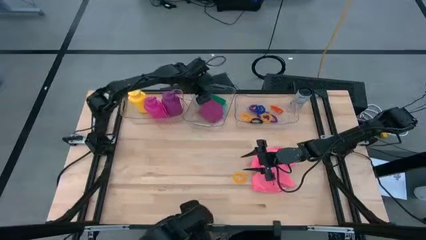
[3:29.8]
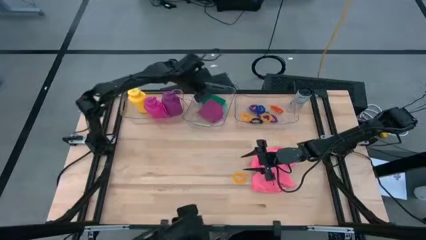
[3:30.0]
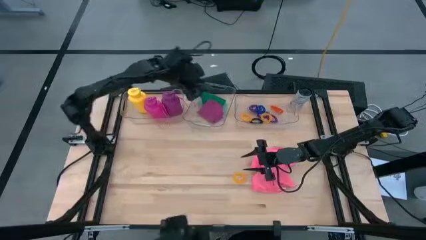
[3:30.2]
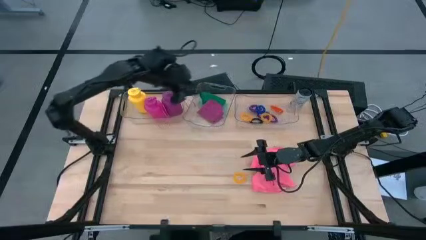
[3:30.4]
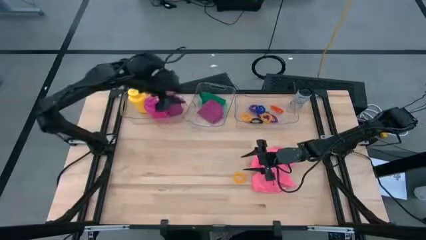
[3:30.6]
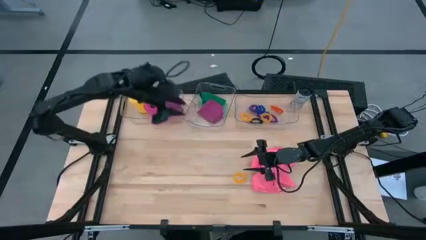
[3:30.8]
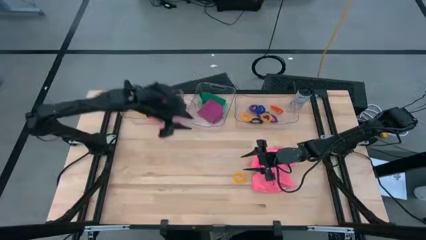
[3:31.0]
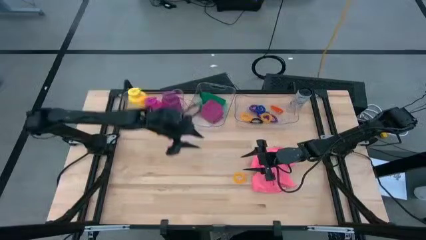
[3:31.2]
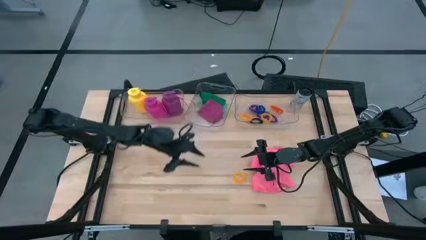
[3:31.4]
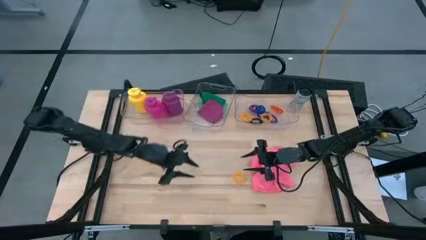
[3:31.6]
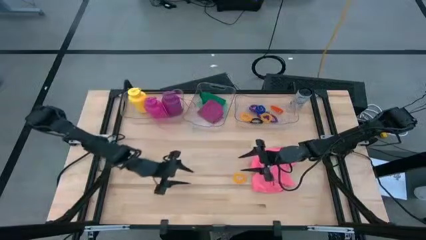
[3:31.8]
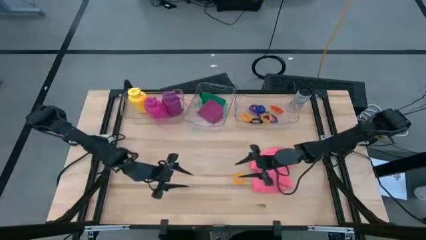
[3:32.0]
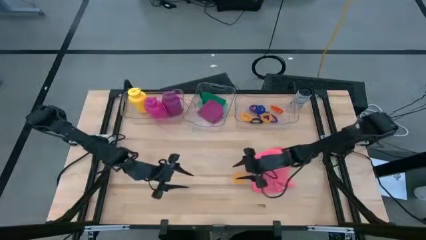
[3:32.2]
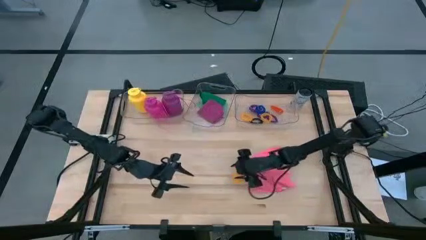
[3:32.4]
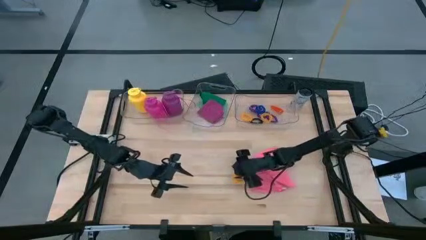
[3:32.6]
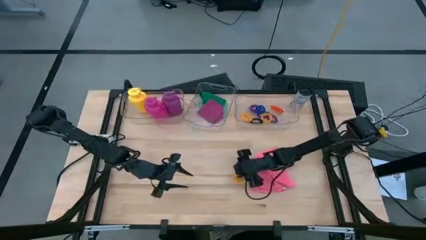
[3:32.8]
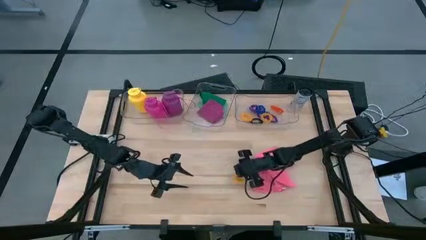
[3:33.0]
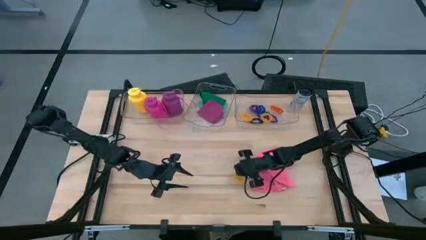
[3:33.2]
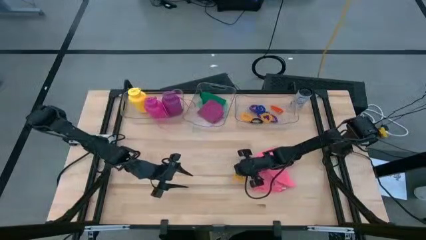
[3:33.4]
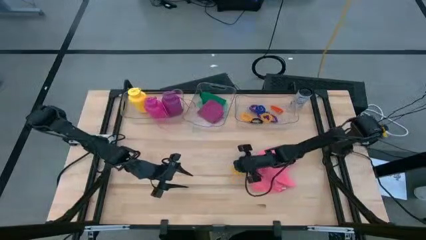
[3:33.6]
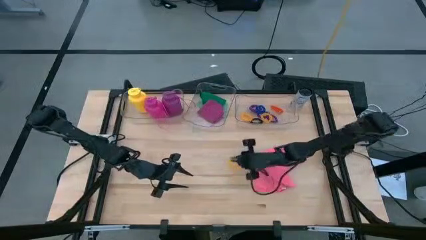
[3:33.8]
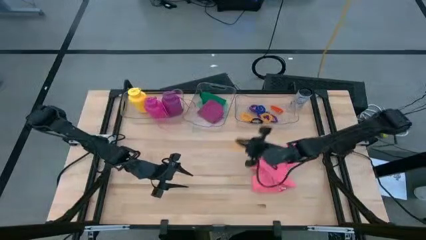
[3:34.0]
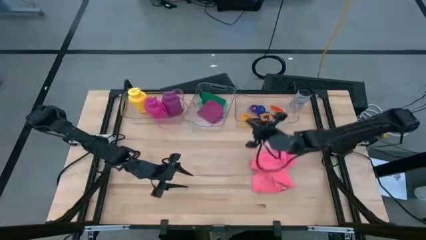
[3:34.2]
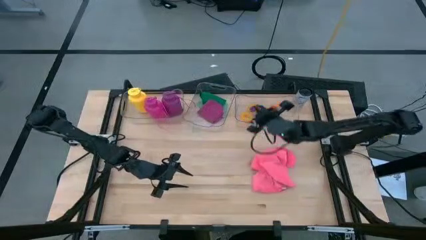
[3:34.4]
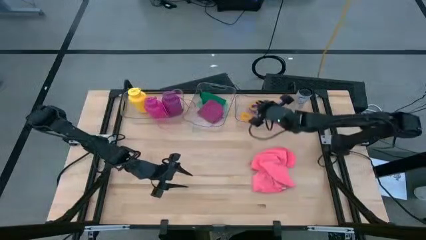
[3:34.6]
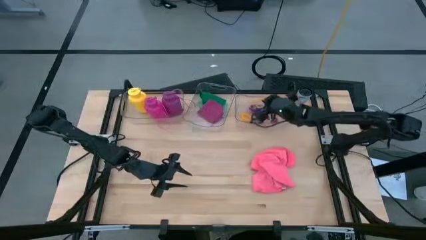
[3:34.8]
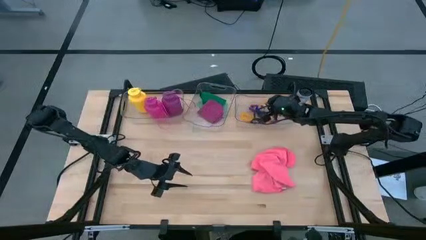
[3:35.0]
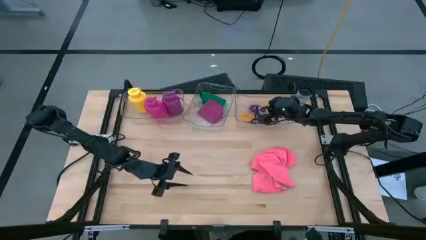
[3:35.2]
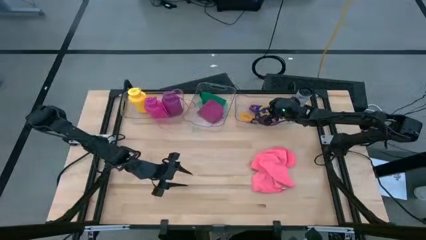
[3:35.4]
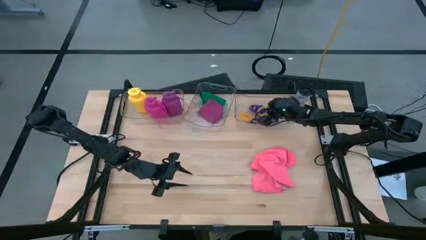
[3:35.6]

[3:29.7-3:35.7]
Task: Pick & Place Sports Items
Put the yellow spring keychain into the right transparent bin

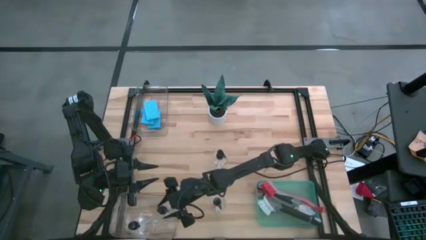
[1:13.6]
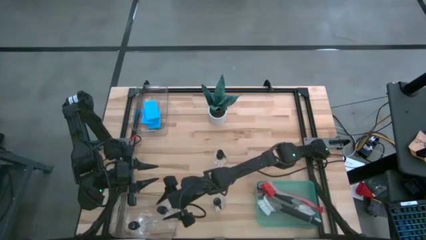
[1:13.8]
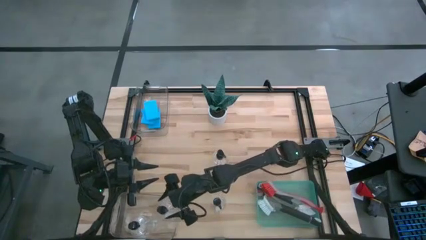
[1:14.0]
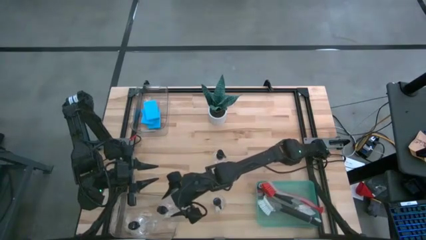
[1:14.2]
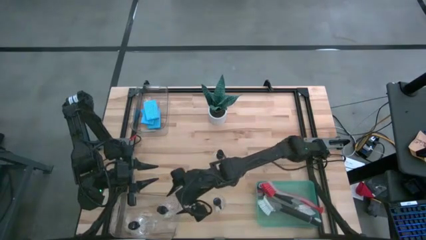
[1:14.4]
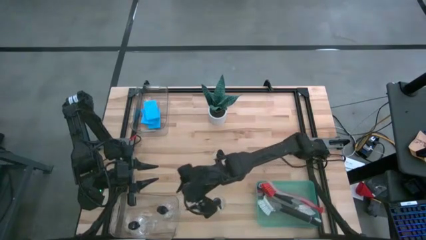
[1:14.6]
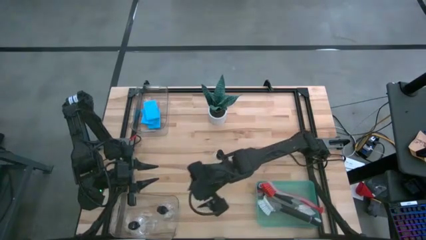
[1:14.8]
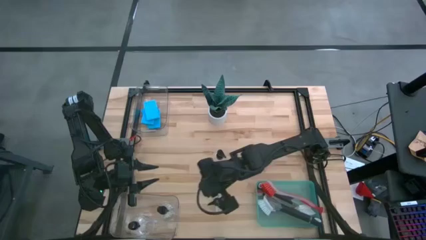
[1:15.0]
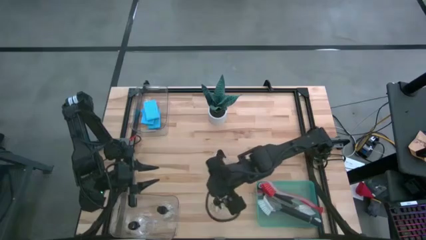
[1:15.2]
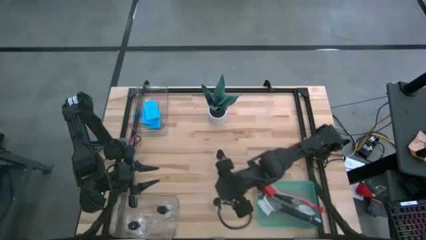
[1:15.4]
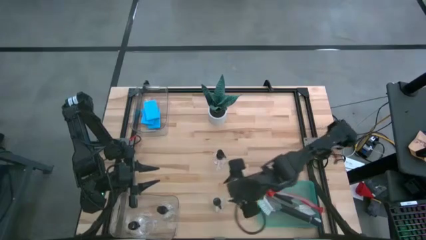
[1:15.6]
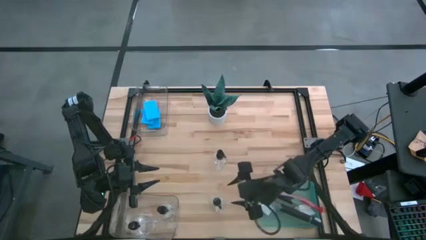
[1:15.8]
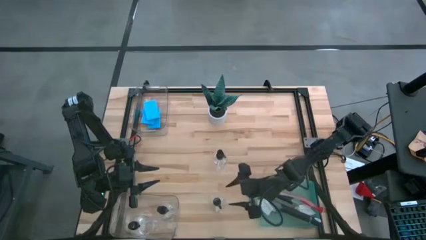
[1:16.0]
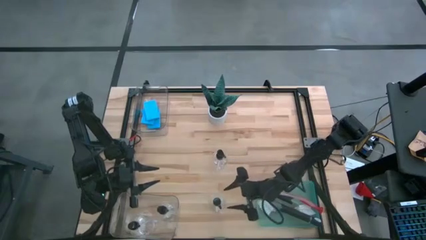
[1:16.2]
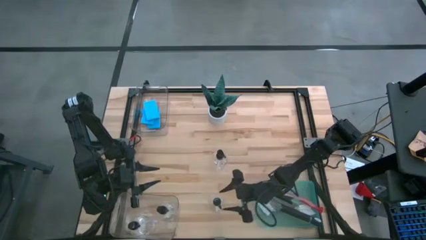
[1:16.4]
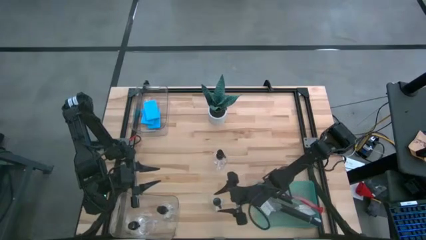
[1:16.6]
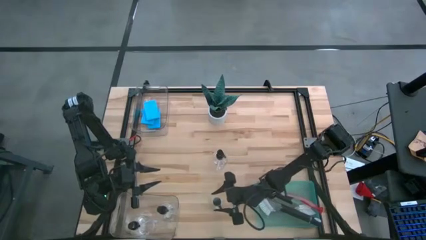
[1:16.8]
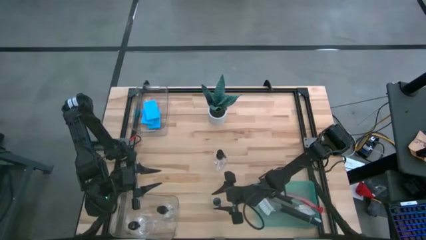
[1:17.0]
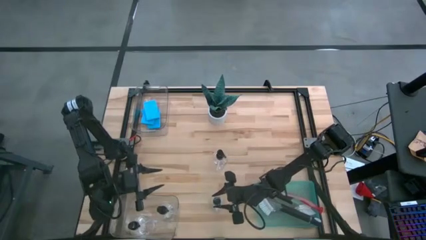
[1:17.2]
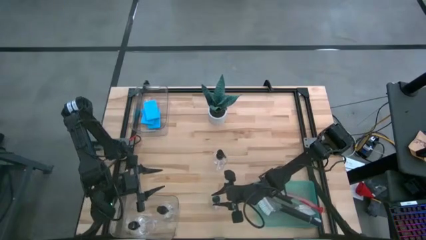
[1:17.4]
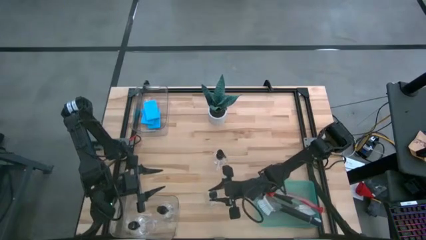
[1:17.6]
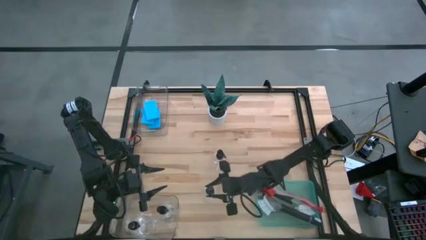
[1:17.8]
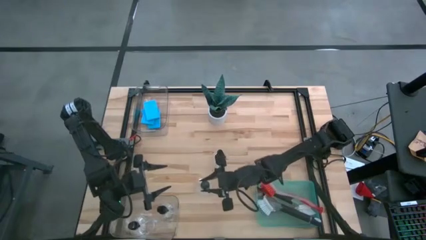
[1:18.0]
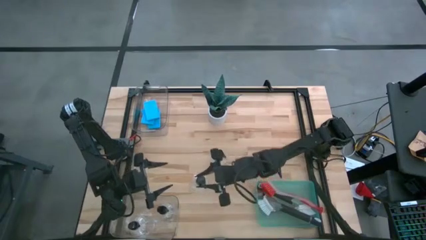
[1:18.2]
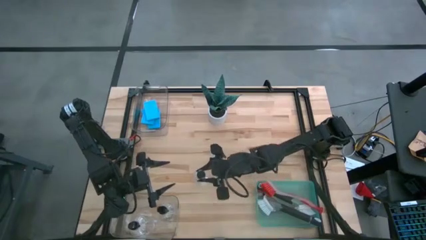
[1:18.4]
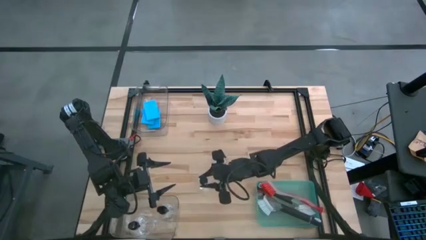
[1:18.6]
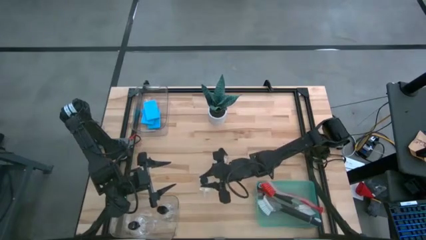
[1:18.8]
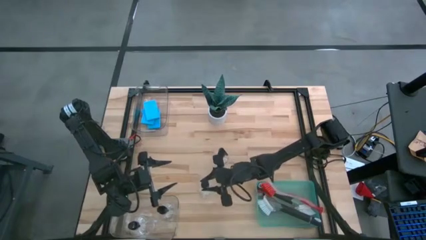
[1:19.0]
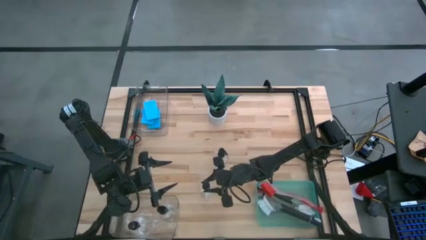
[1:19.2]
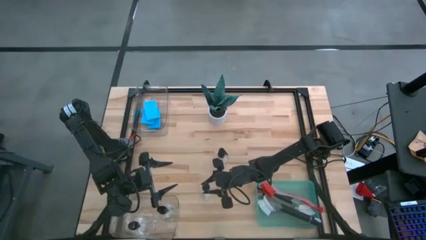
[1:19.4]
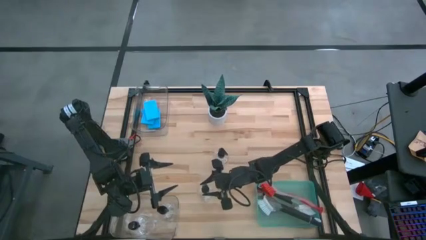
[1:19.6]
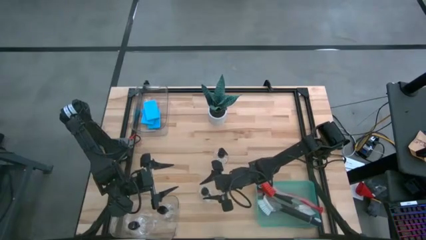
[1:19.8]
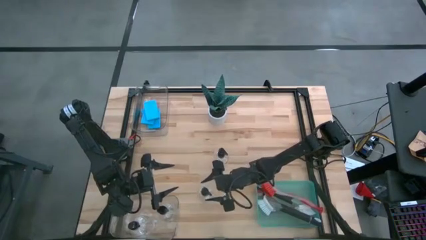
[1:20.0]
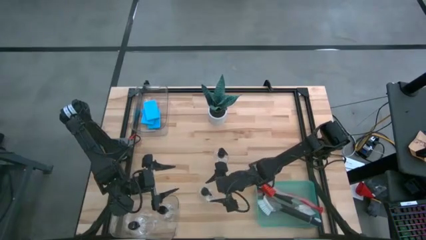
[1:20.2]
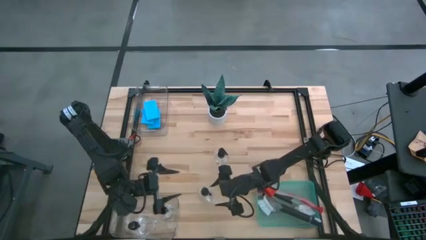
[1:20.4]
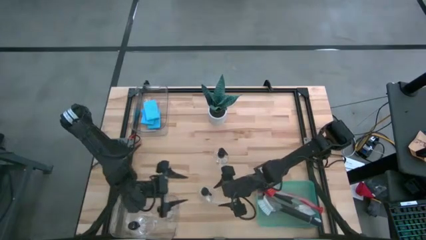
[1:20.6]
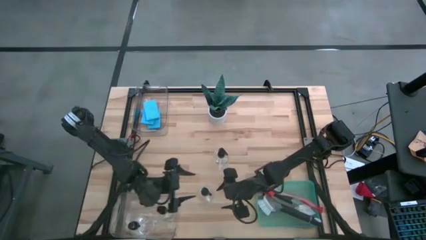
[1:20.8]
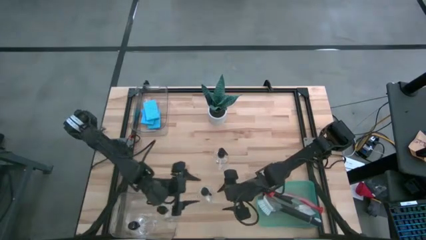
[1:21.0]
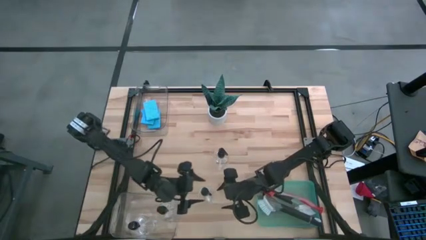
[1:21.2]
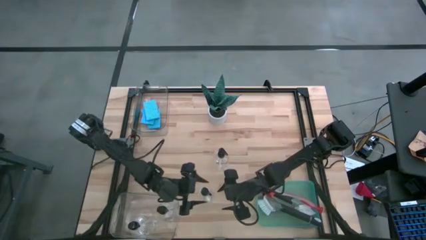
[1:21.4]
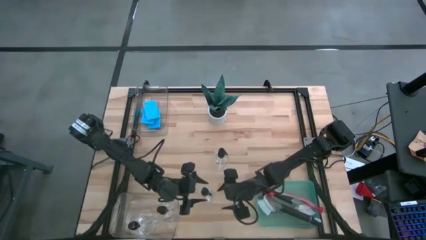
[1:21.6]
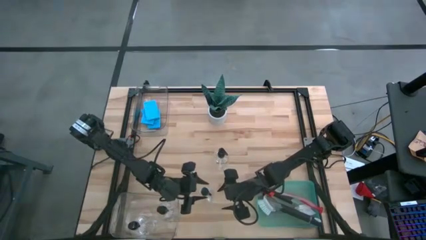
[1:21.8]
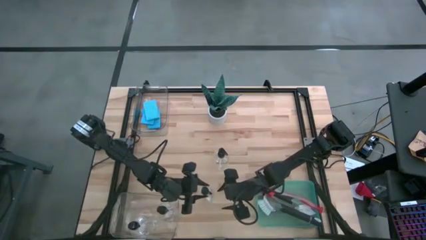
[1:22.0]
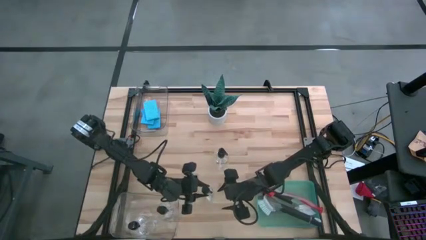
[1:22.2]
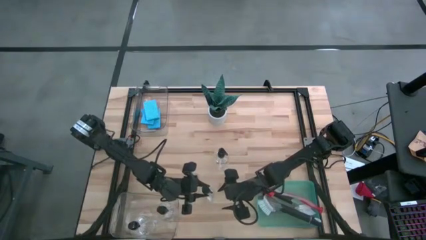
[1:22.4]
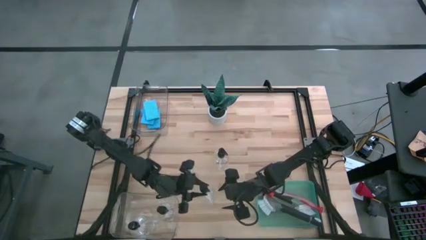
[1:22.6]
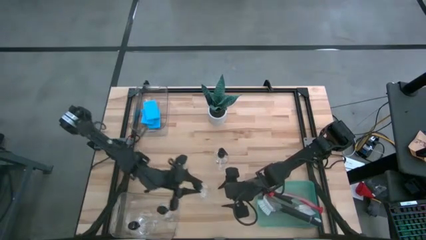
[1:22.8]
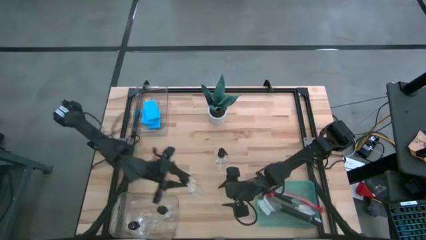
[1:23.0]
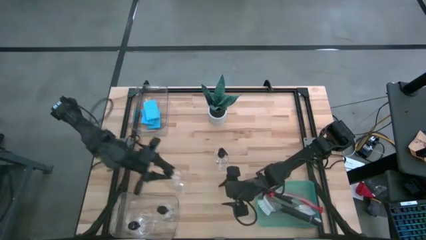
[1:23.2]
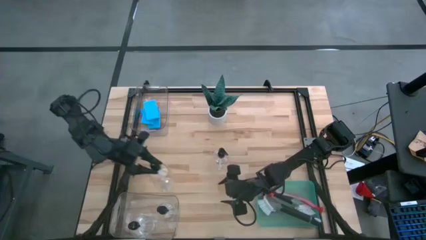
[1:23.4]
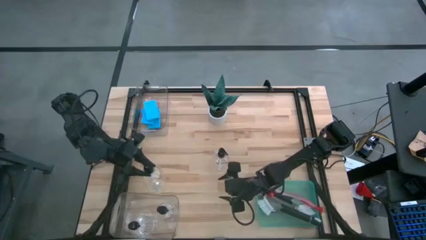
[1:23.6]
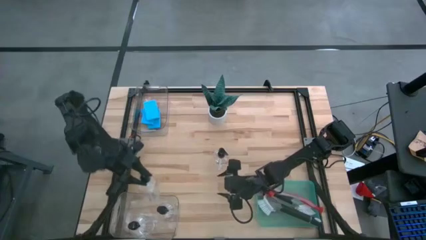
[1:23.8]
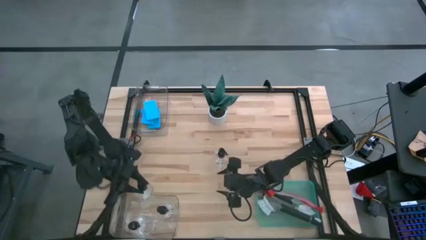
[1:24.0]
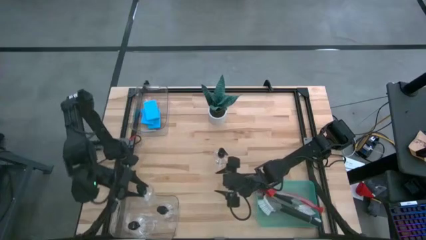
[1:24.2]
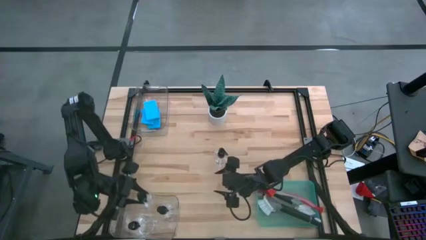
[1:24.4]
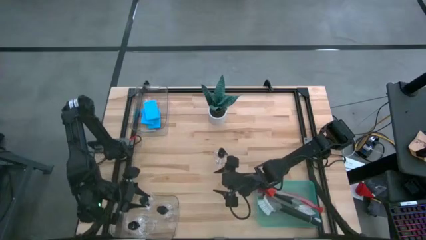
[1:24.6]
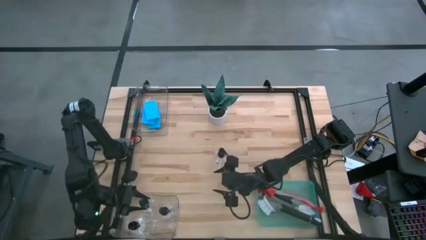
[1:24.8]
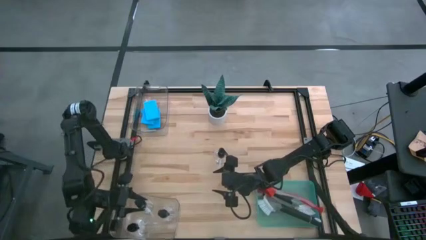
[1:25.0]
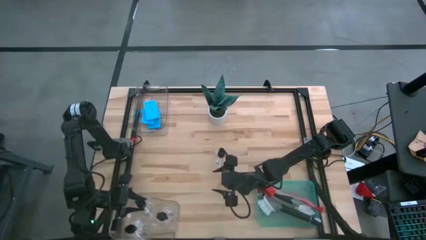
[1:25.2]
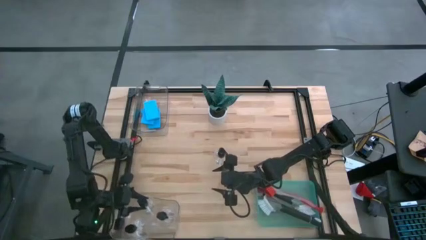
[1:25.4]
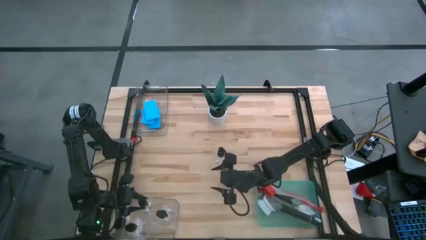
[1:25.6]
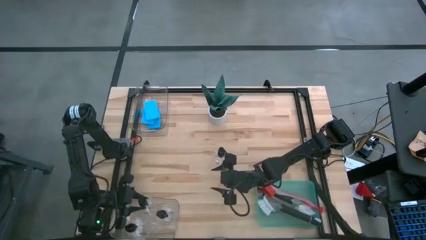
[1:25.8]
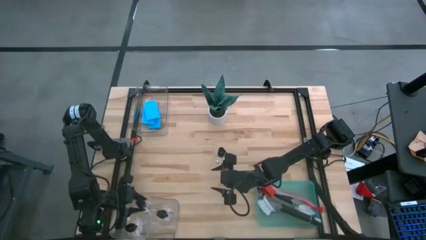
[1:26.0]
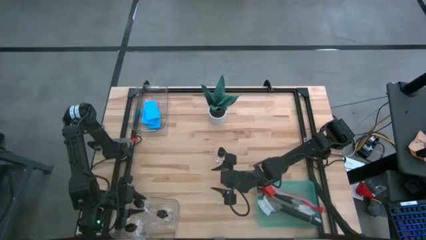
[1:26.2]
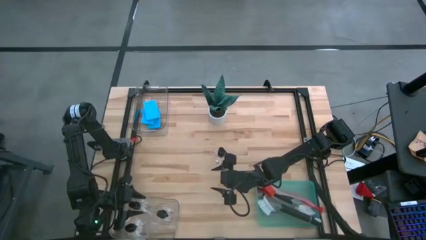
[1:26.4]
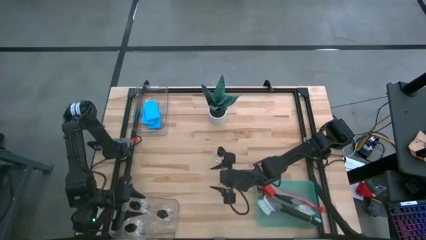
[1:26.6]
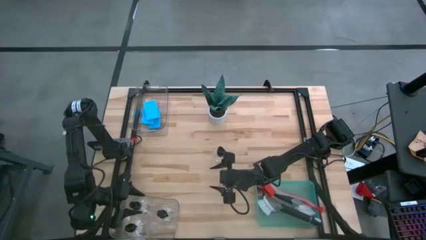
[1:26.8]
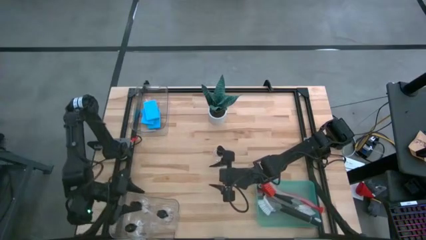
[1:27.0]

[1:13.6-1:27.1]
Task: Pick & Place Kitchen Sink Supplies
Put the transparent spray bottle into the bottom transparent bin
